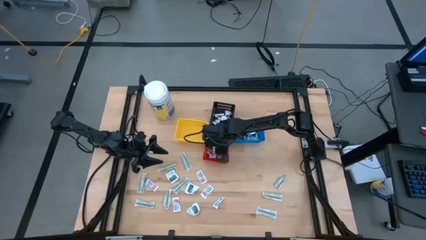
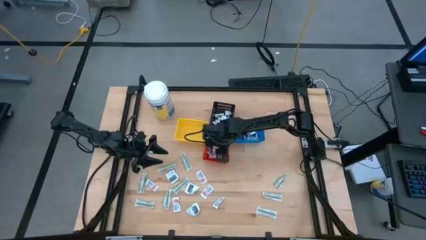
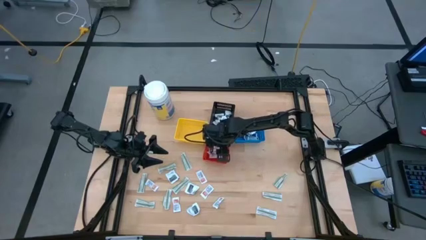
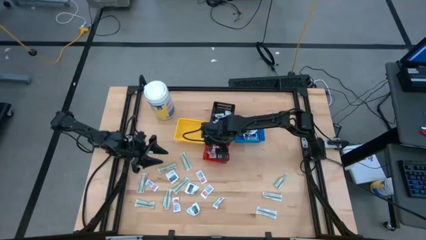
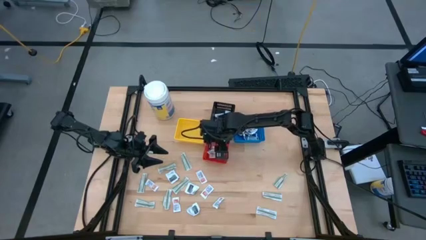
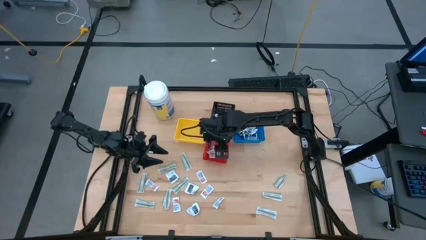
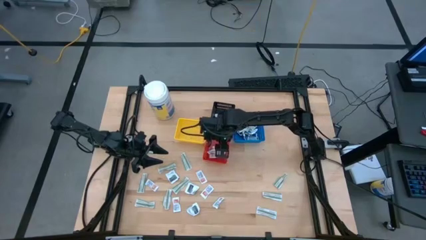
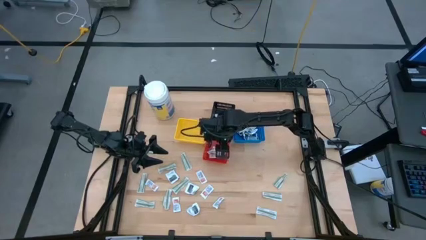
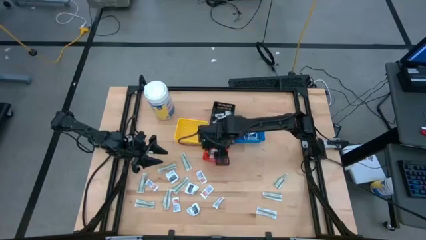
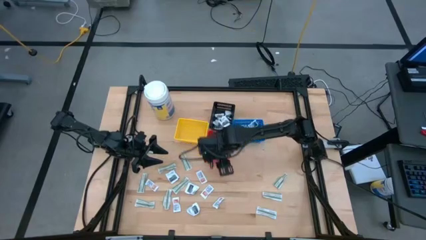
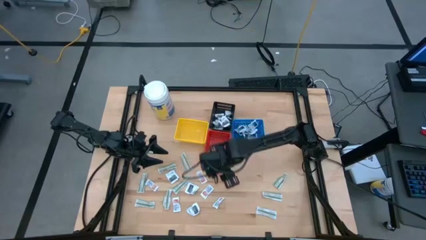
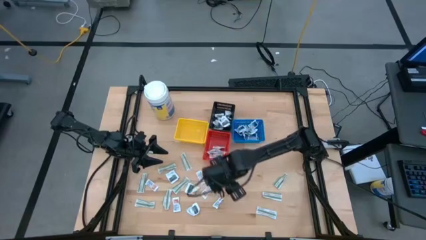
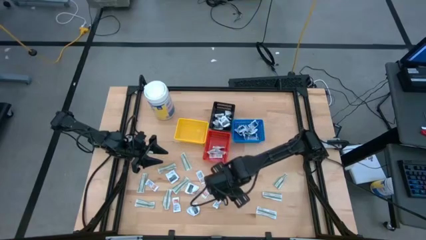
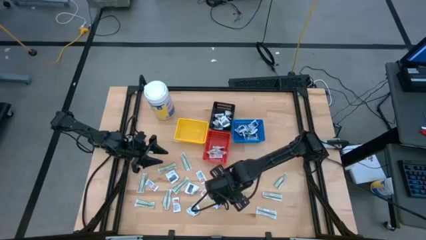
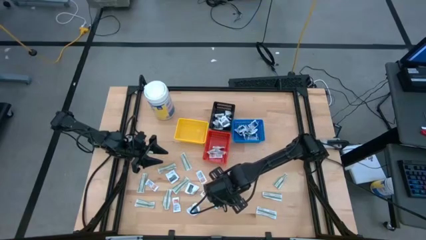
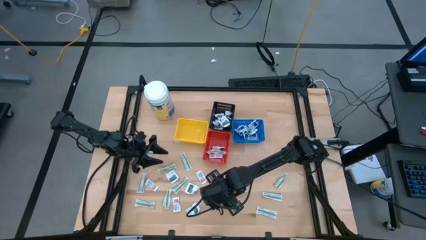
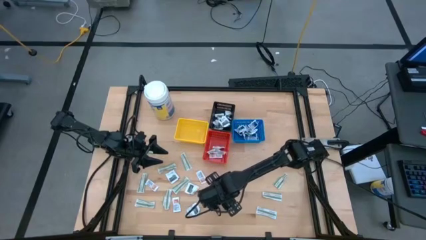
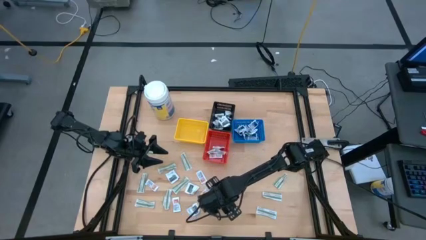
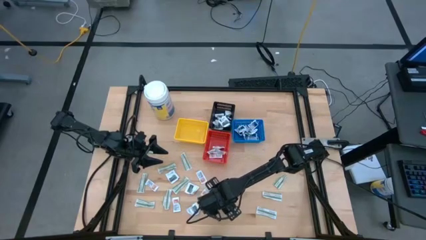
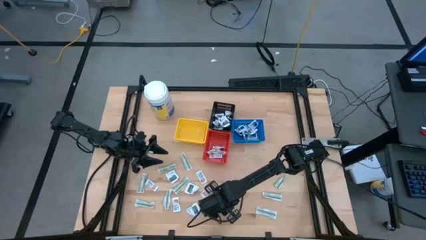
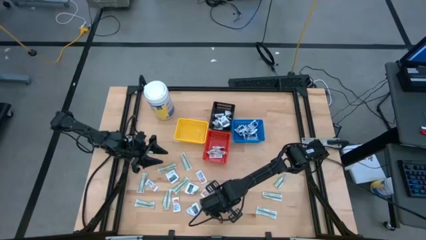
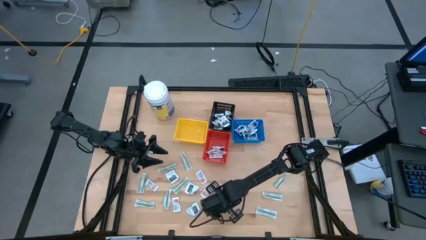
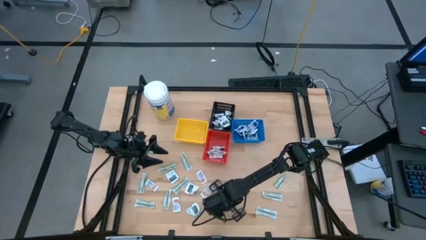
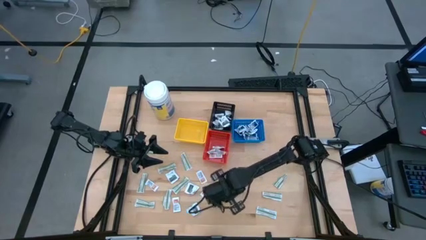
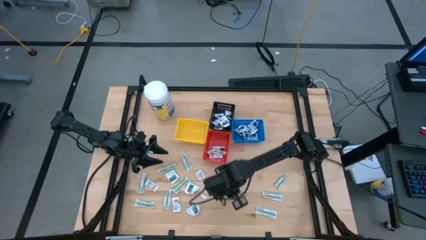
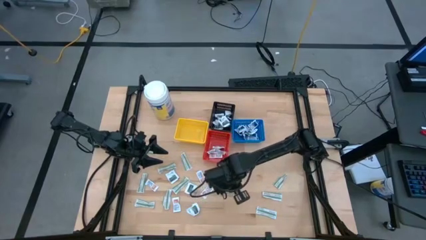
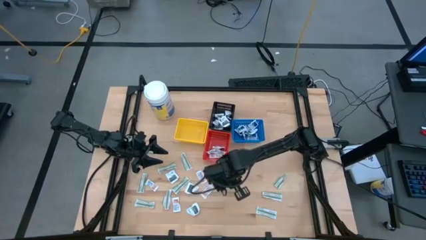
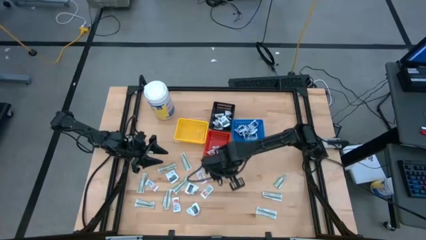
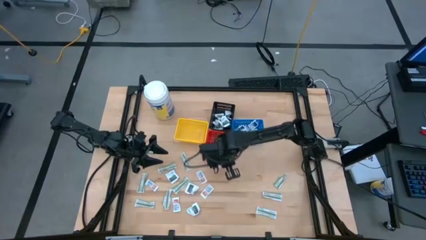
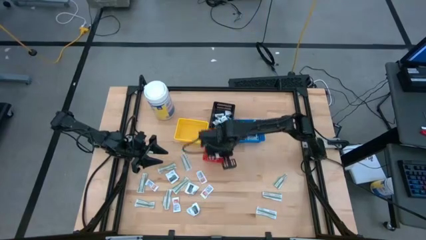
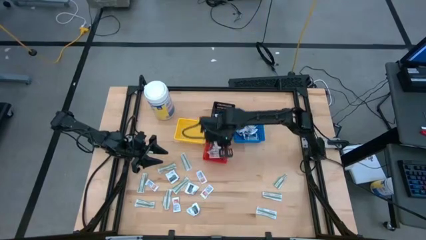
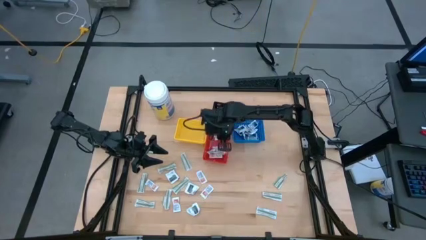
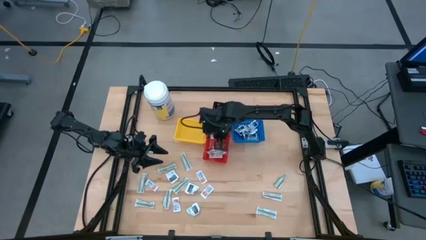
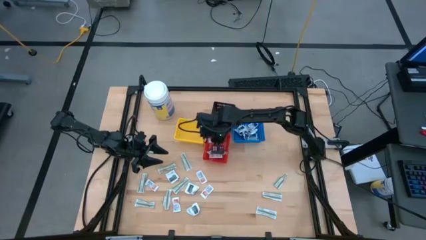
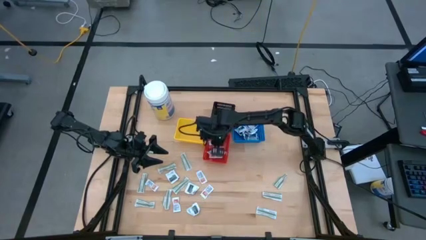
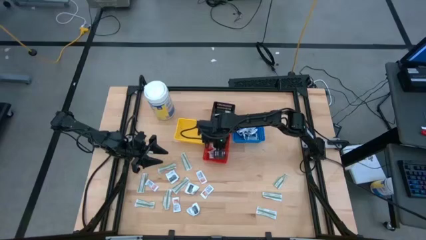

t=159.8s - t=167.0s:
Task: Pick & Place First Aid Supplies
Put the ointment pack into the red bin

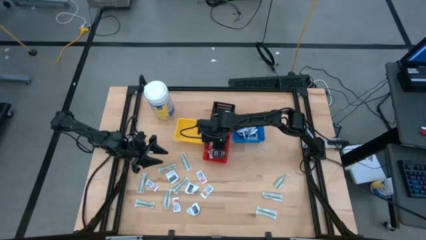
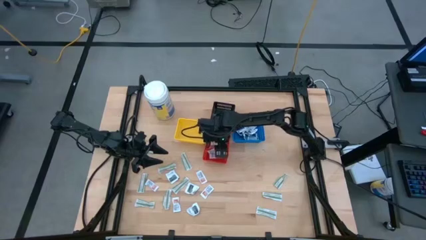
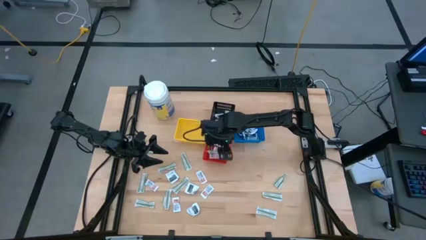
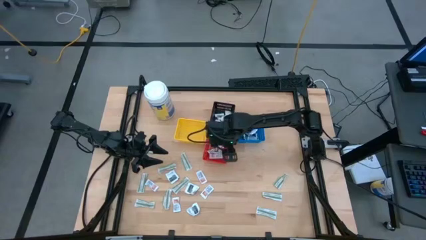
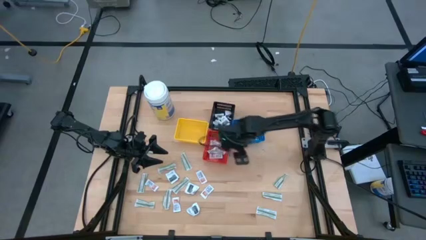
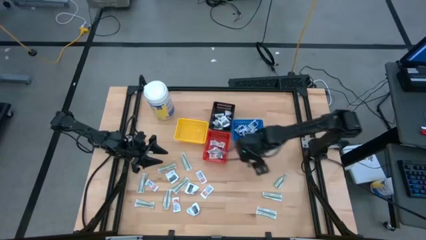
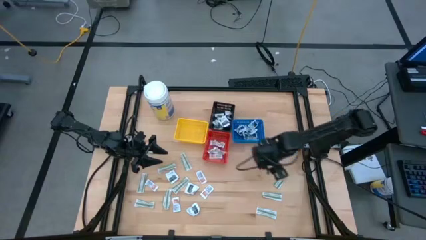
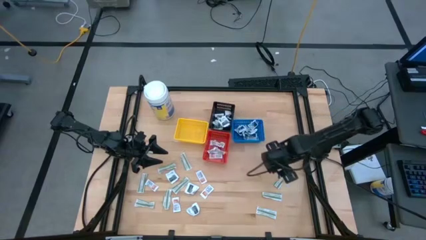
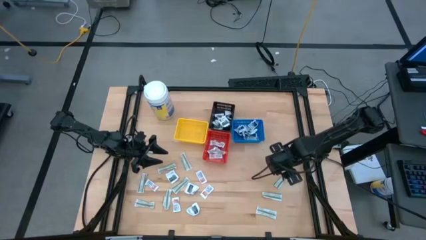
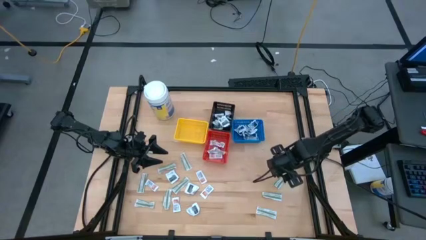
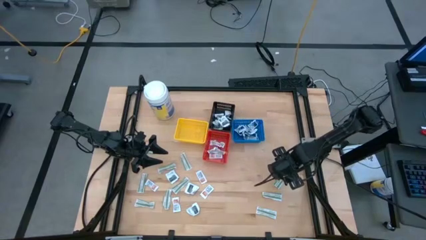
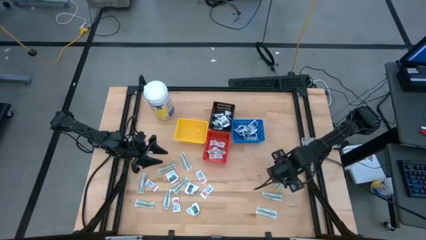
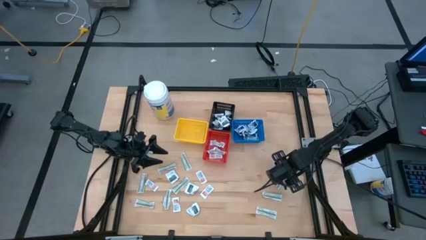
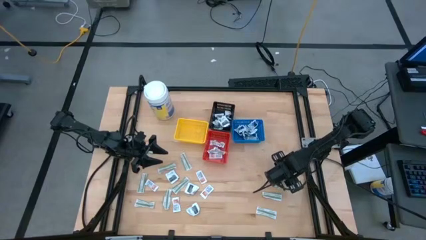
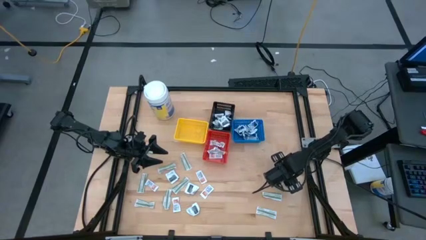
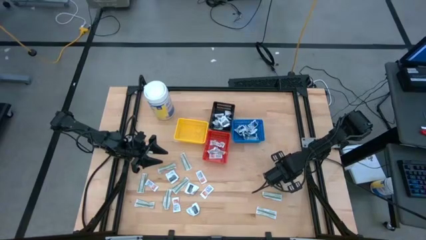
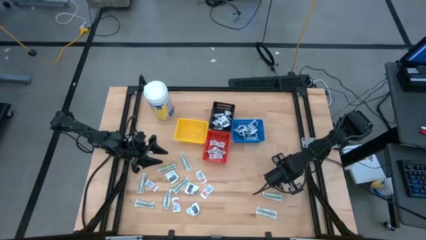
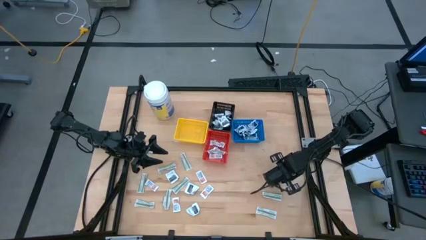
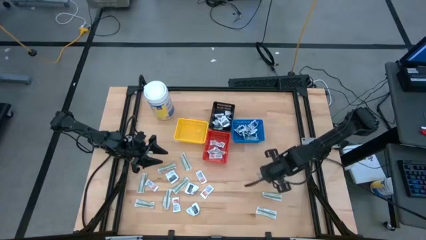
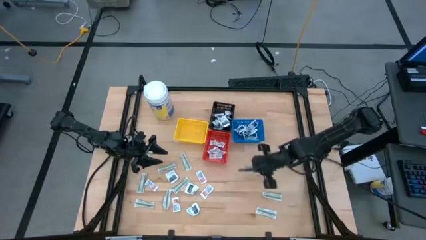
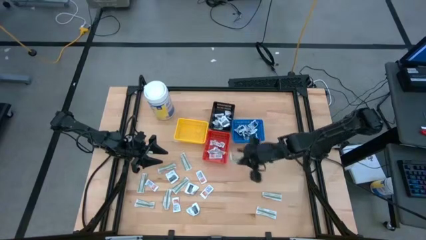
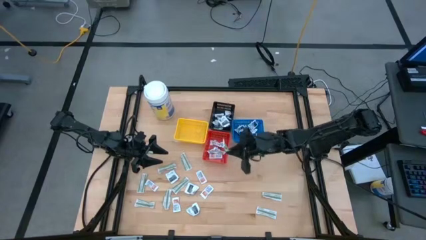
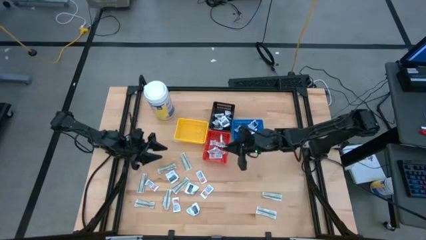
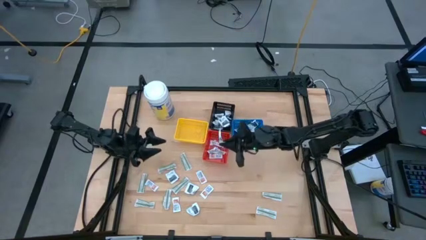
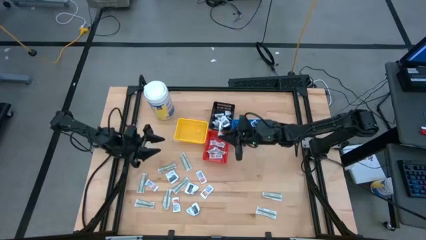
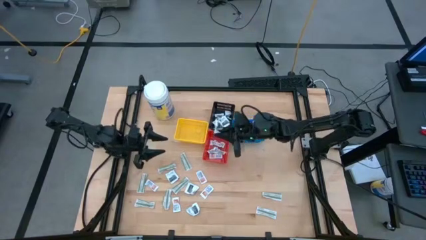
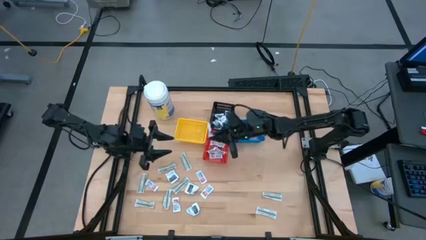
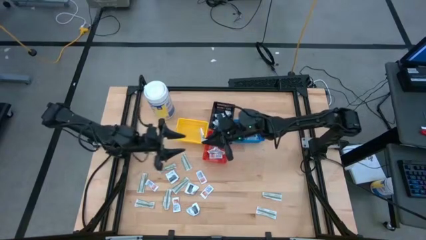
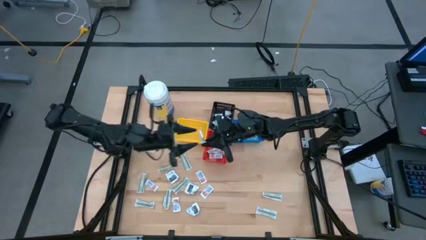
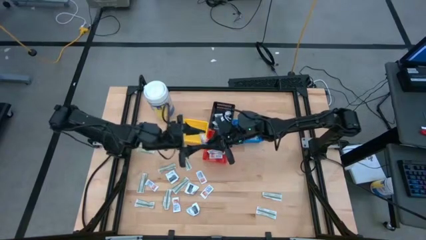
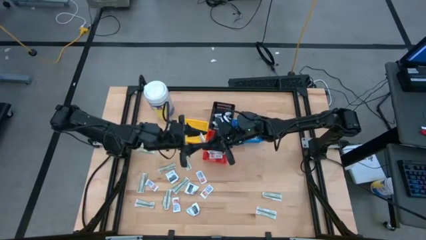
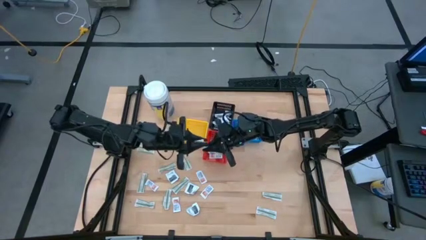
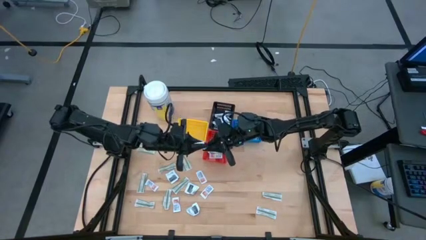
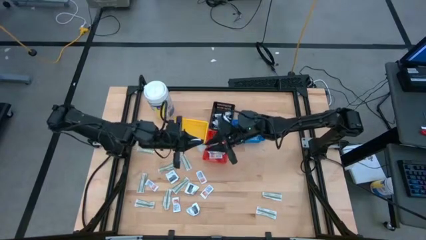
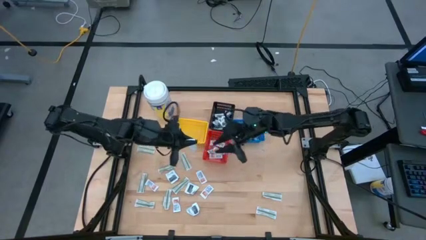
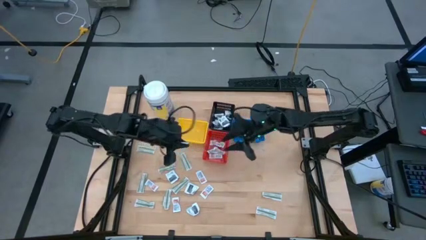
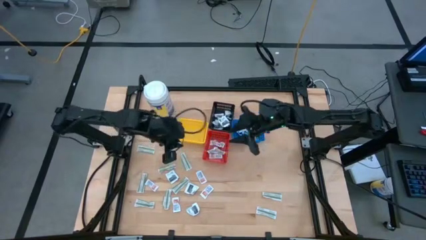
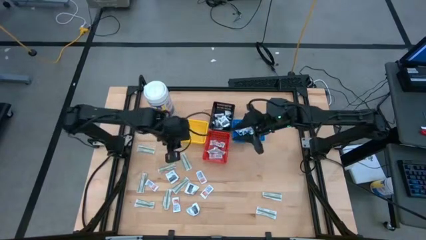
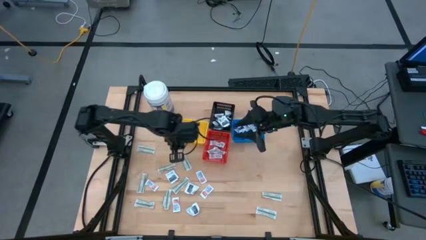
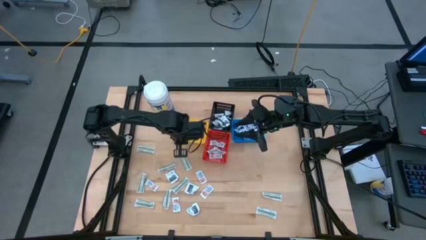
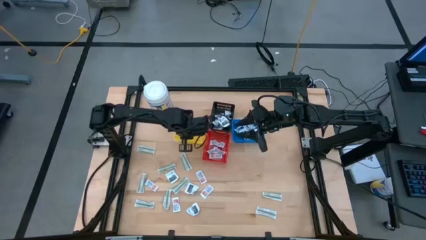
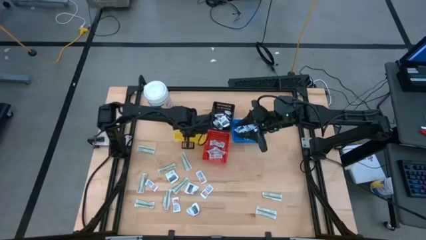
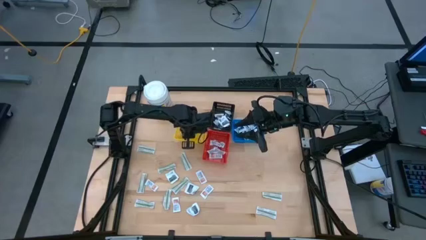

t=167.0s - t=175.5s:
Put the bandage pack into the yellow bin
